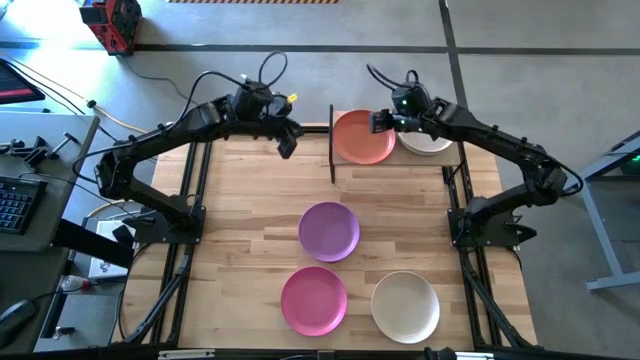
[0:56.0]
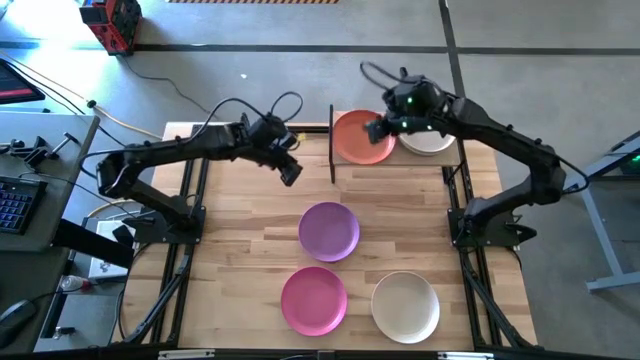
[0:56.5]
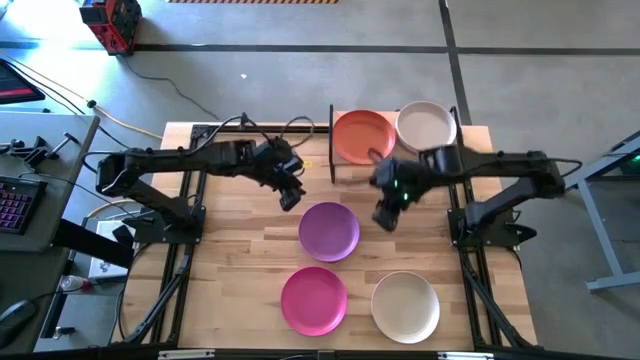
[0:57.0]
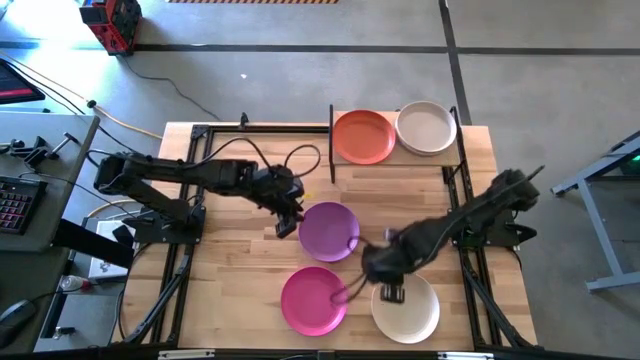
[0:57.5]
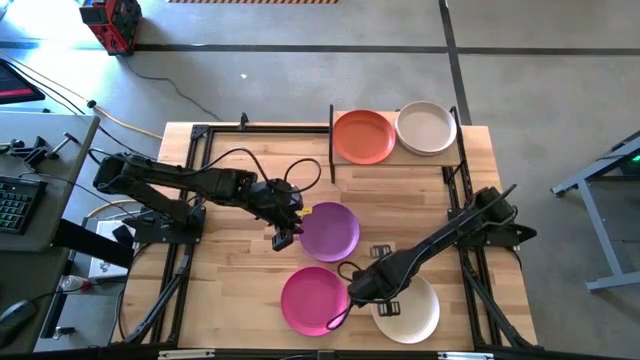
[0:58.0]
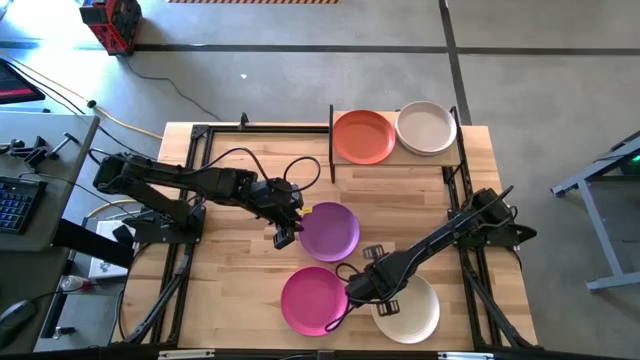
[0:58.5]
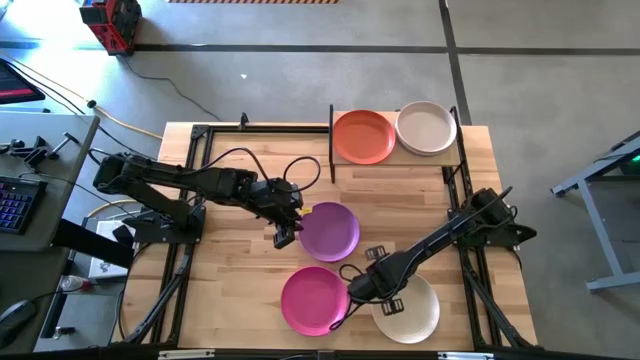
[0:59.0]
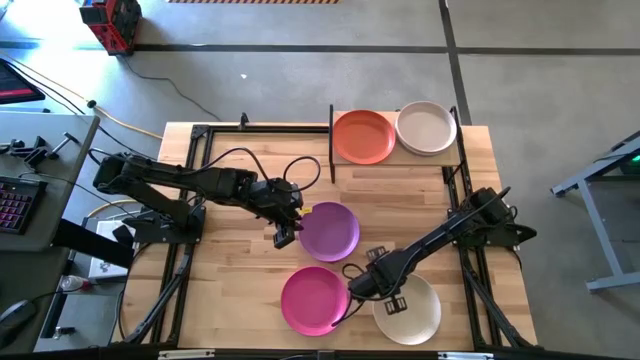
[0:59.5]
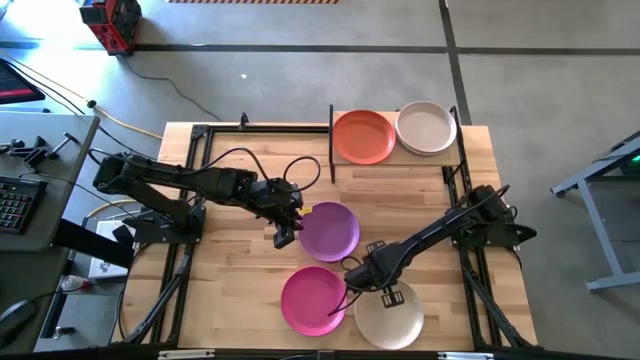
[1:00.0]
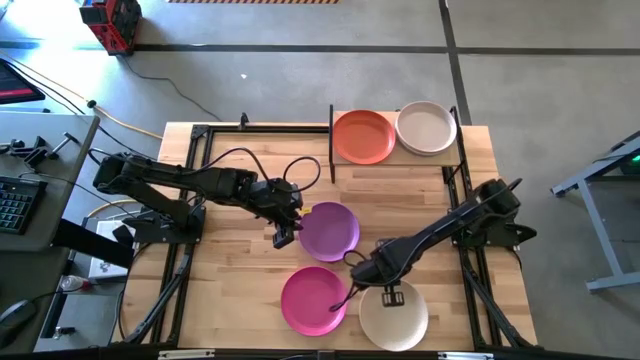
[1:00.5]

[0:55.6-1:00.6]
Task: Place and stack plates onto a shelf
Stack the white plate on the orange plate on the shelf on the shelf

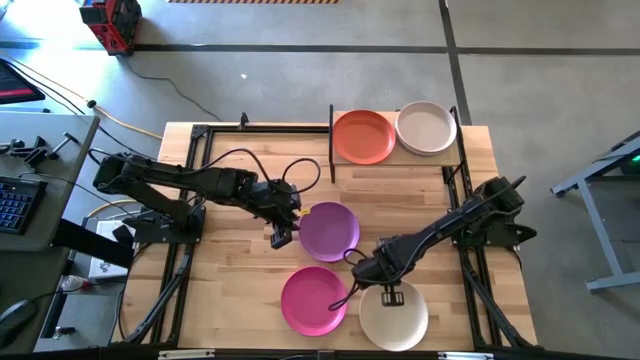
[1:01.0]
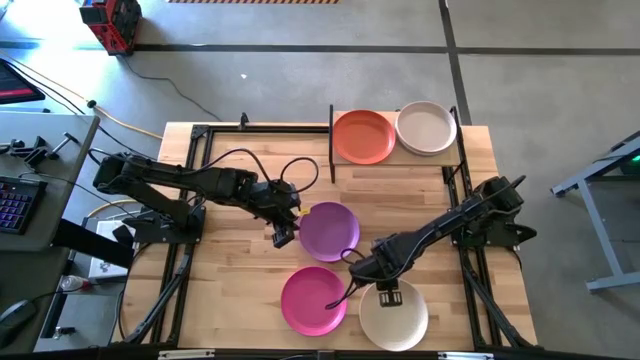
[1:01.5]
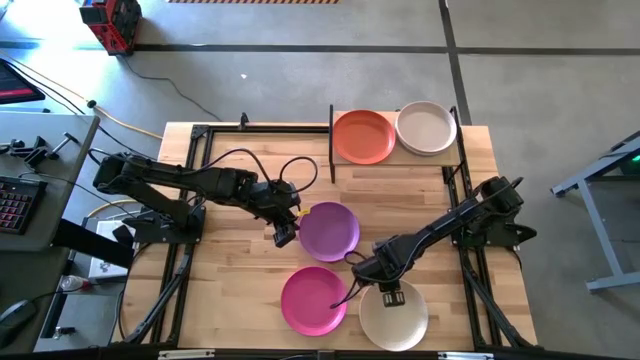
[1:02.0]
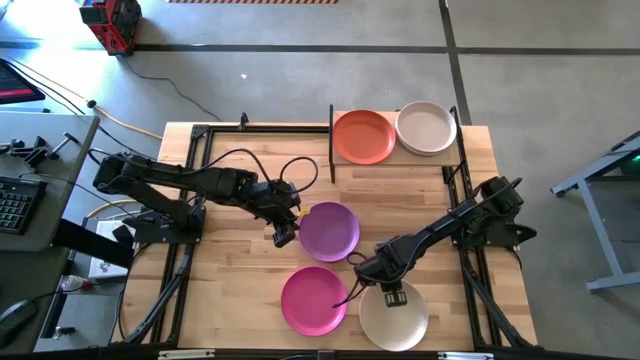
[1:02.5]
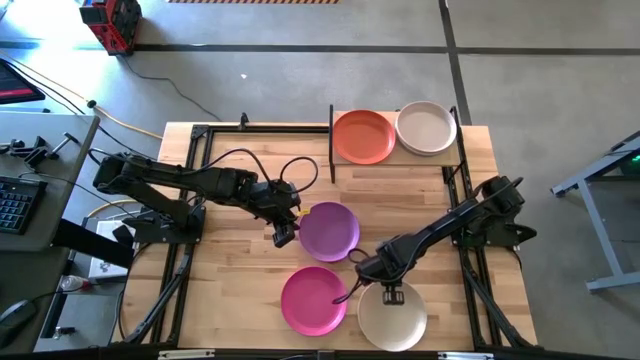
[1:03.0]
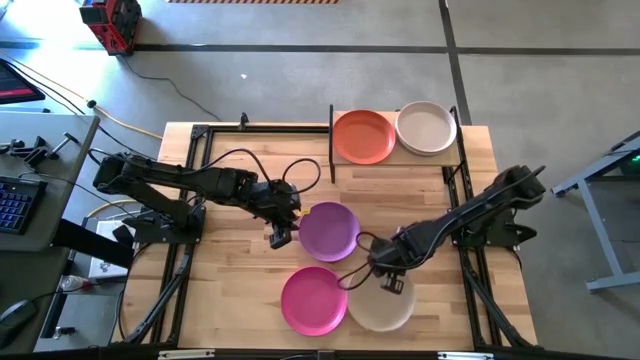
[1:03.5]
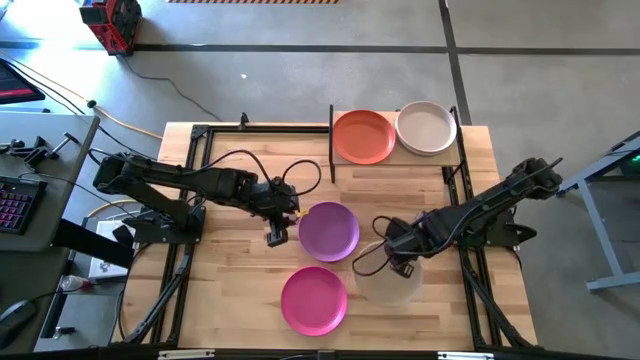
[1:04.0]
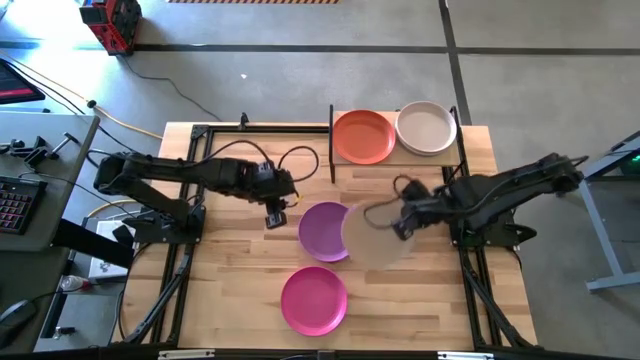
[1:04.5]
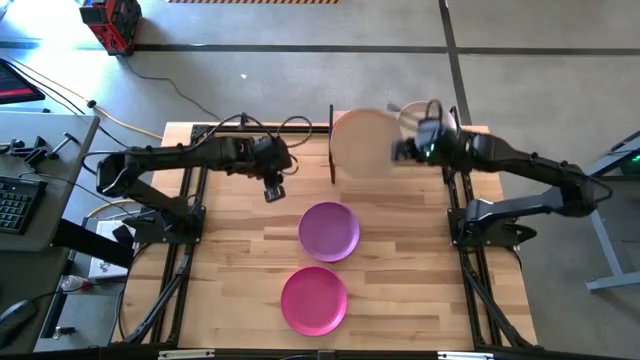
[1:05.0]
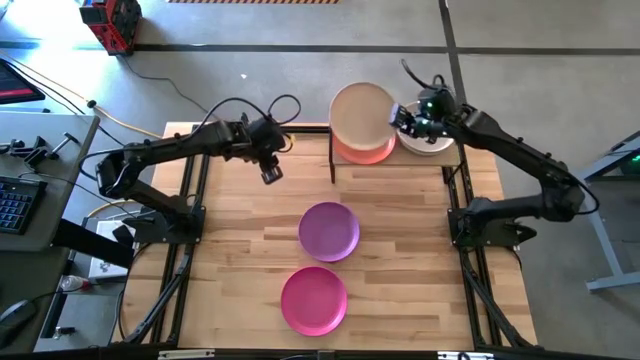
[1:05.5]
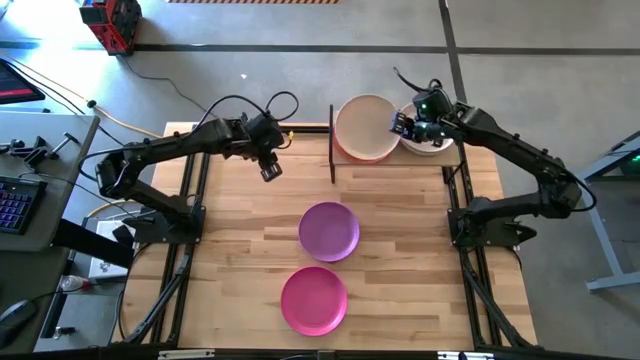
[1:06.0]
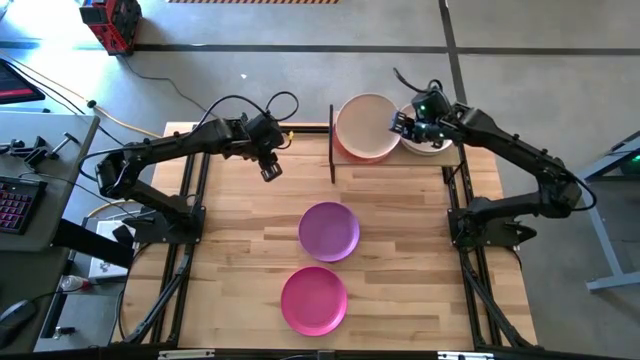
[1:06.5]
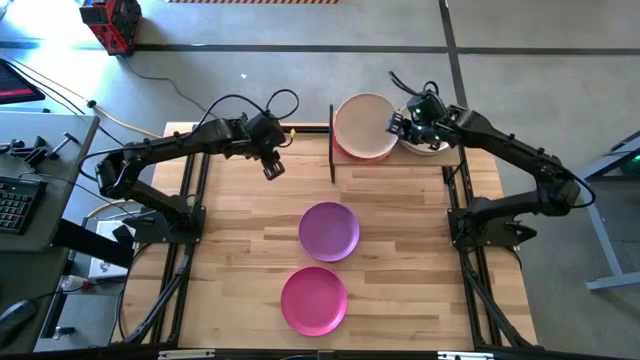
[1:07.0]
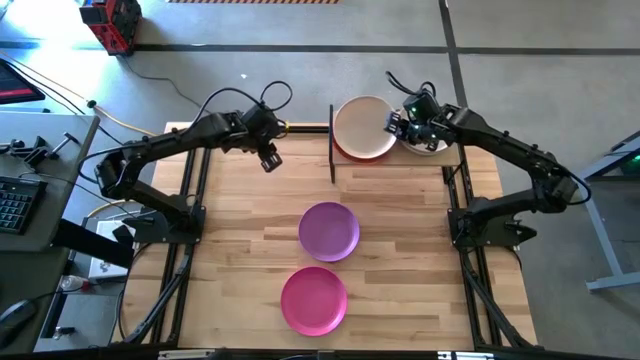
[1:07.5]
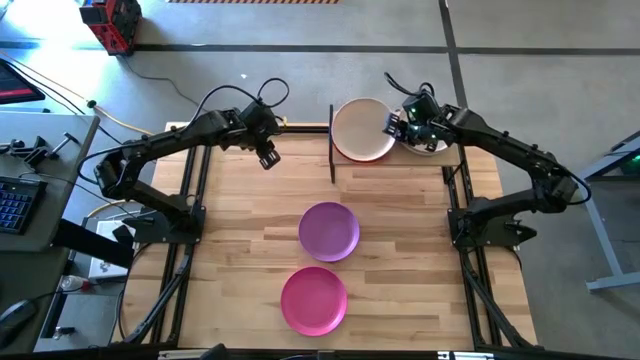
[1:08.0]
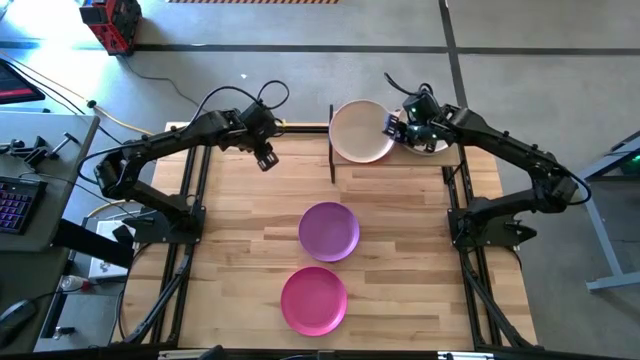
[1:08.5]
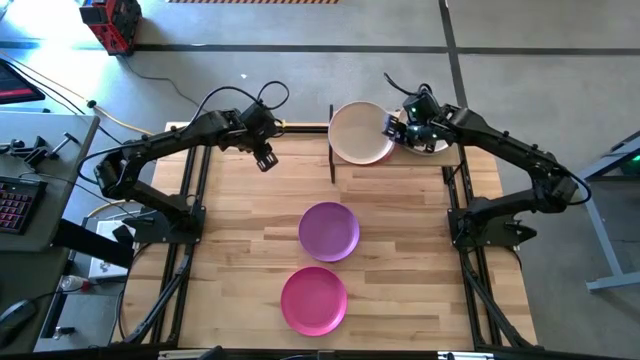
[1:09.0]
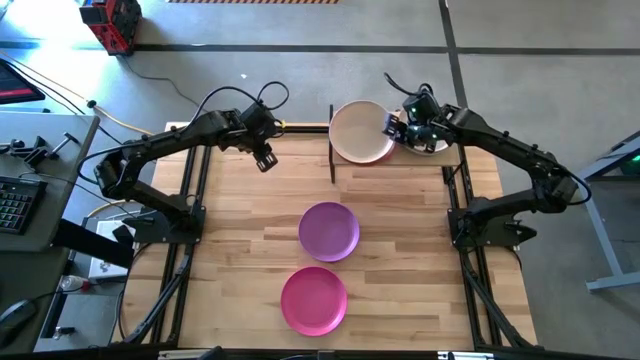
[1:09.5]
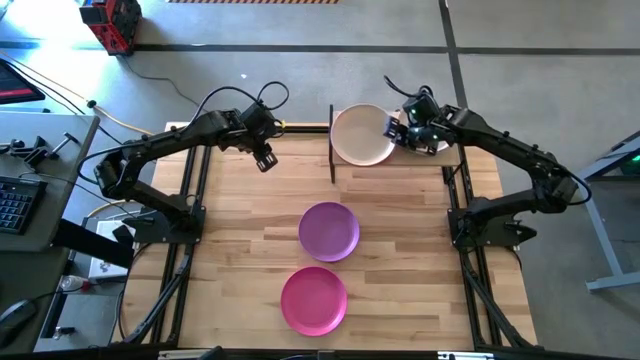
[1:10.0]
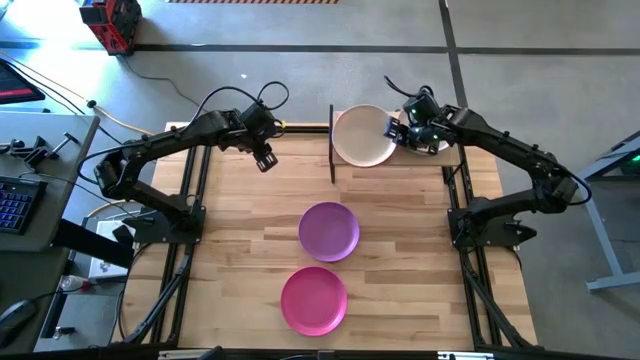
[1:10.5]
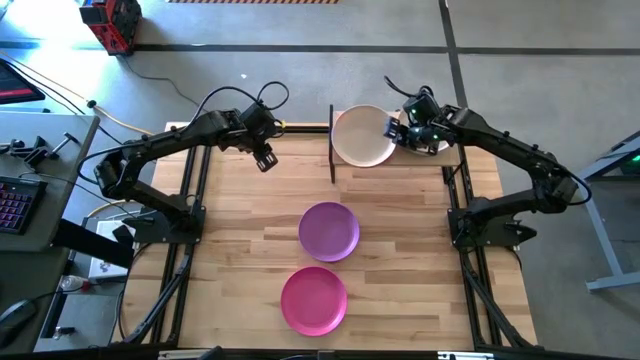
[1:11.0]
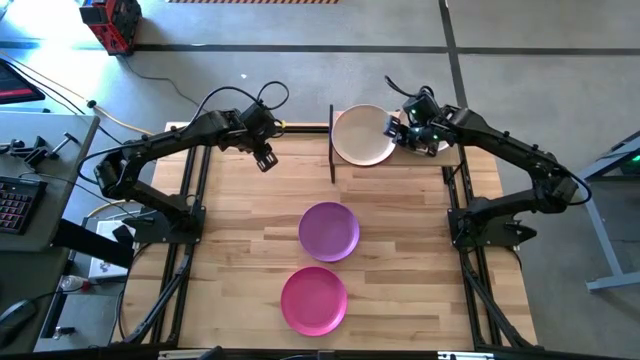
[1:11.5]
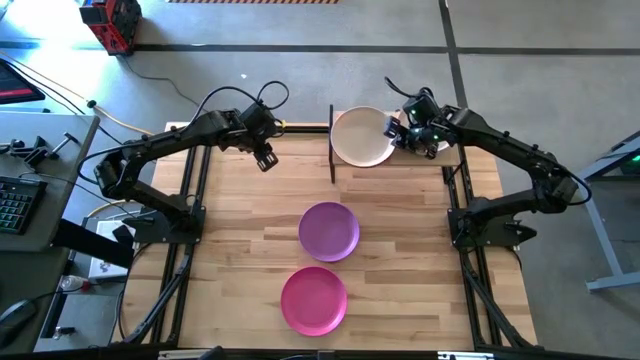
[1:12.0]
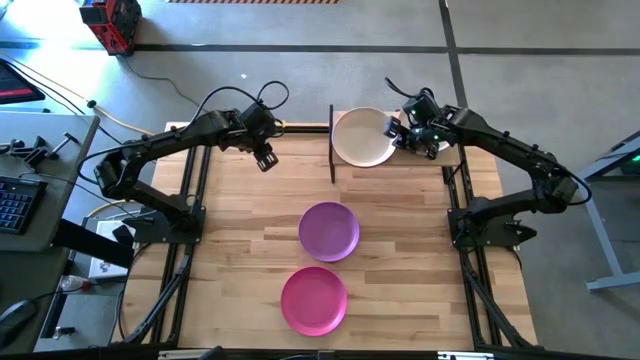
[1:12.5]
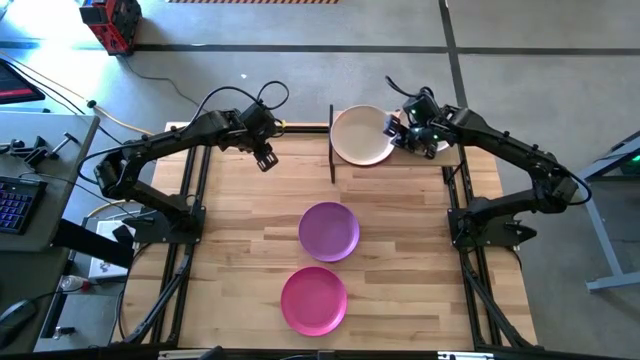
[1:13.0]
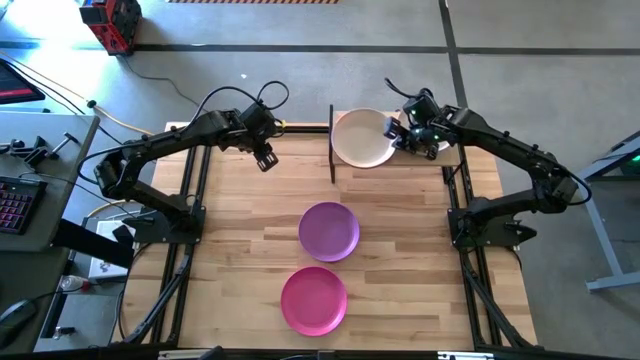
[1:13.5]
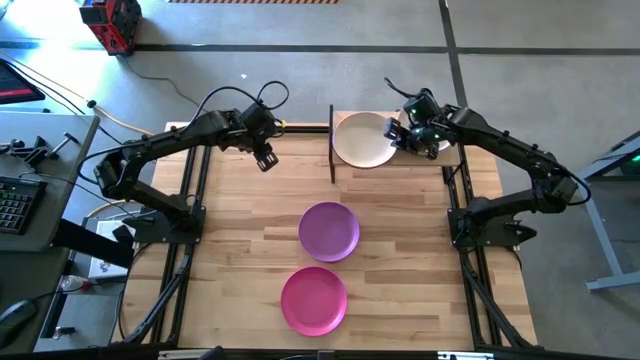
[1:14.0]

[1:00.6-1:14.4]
Stack the white plate on top of the orange plate on the shelf

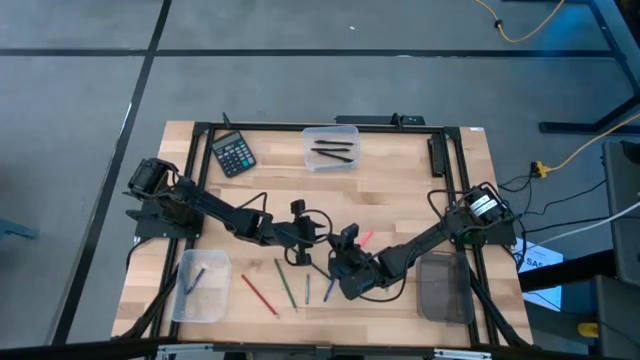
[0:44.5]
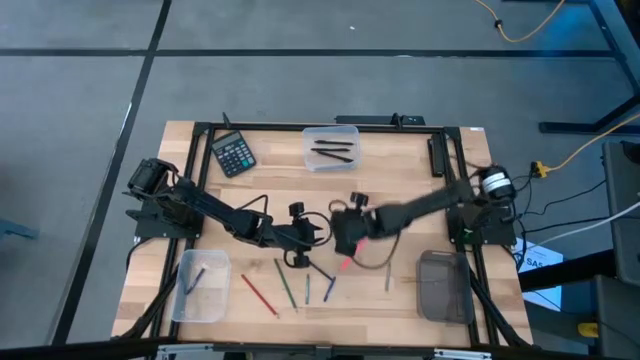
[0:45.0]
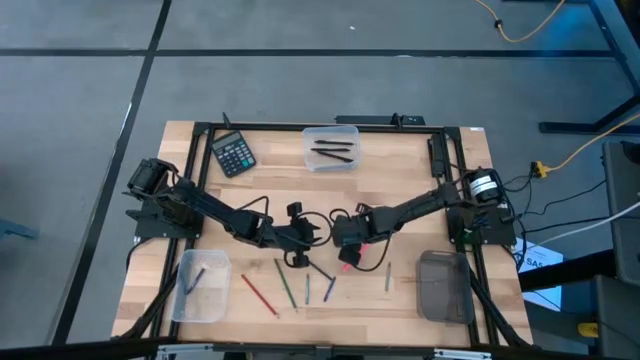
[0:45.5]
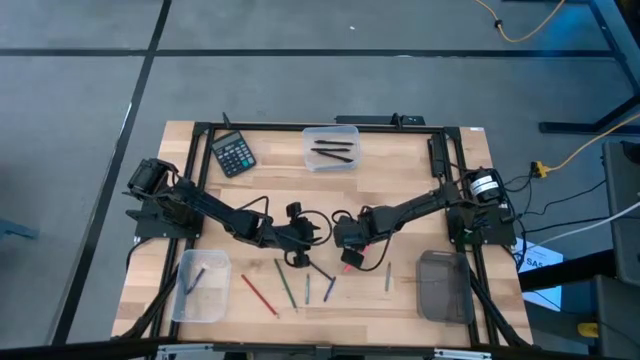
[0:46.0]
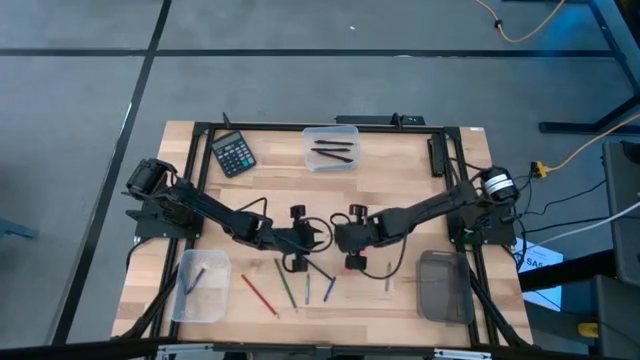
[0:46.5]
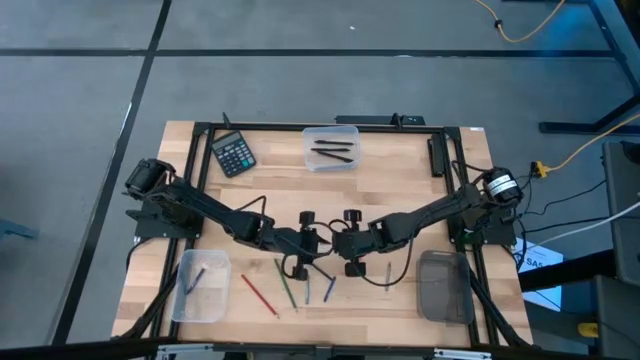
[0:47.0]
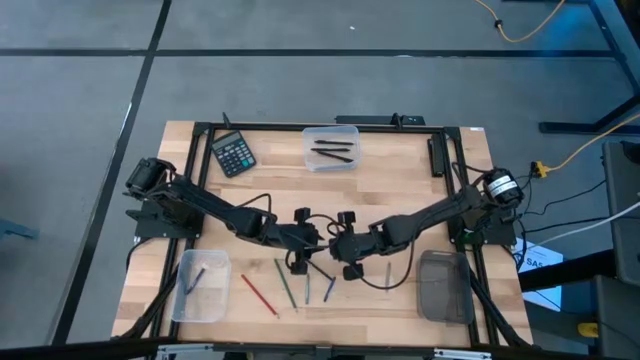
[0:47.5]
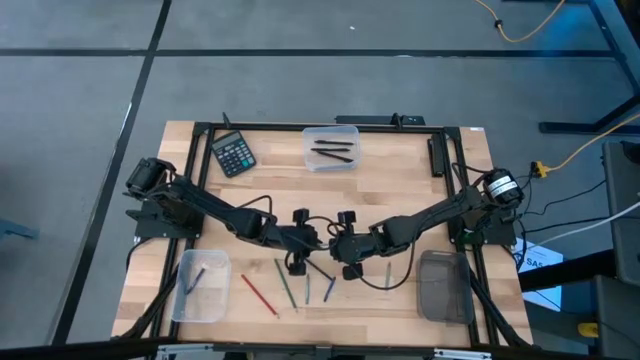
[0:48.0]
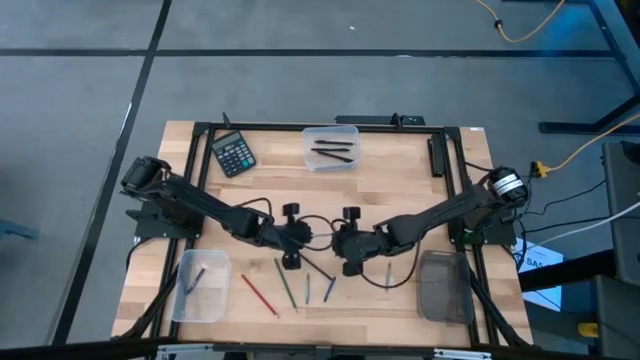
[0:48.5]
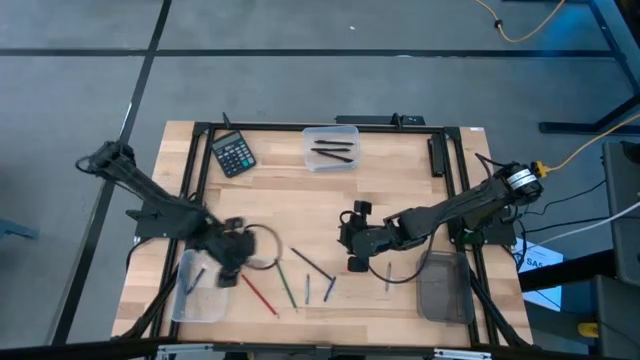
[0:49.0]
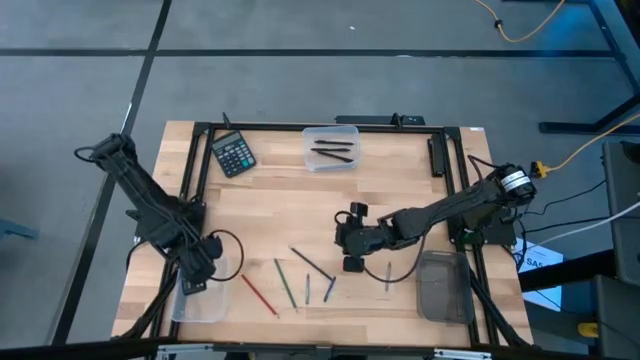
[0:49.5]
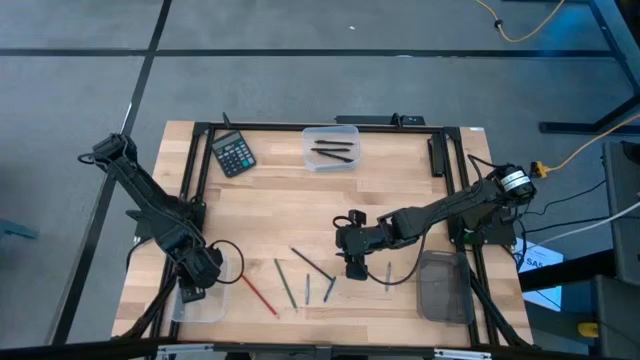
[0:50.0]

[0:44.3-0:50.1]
Task: Sort crayons/erasers/pens/pencils in bins
Put the top gray crayon into the bottom transparent bin
